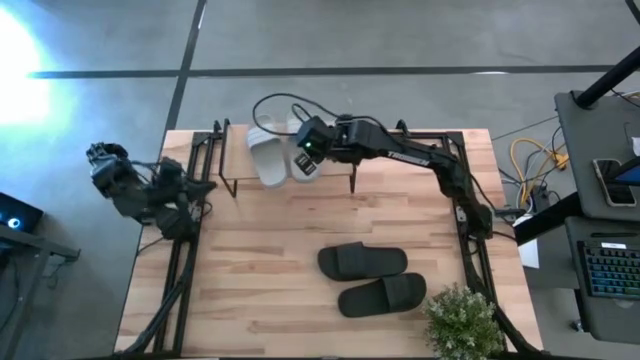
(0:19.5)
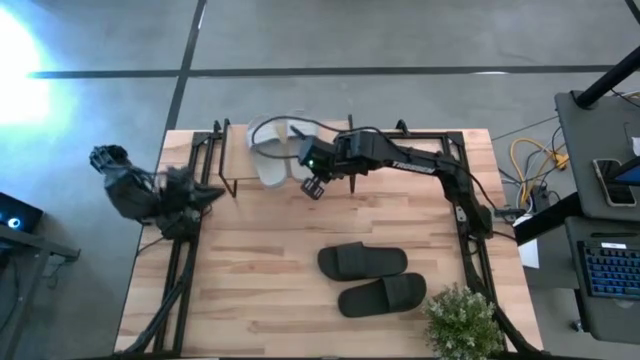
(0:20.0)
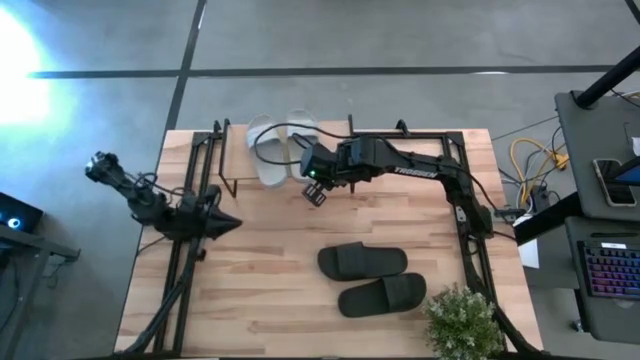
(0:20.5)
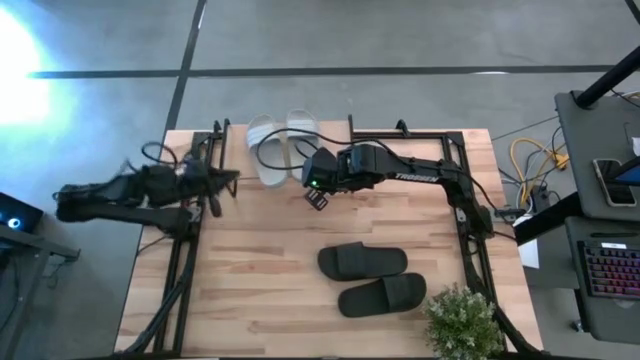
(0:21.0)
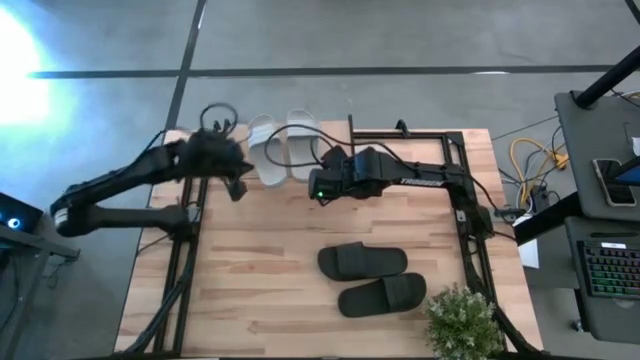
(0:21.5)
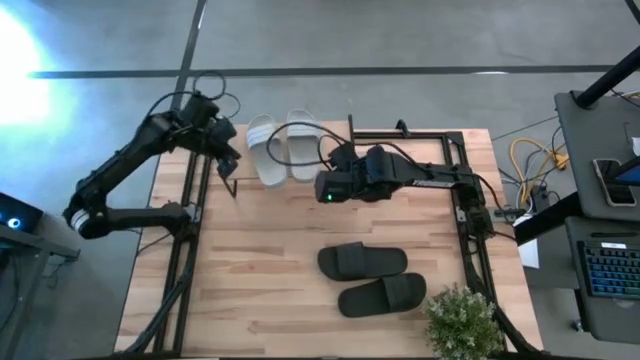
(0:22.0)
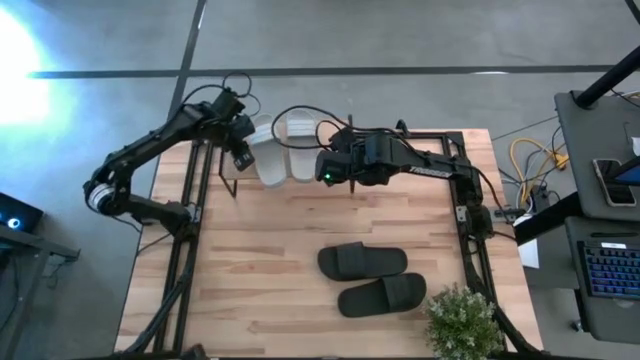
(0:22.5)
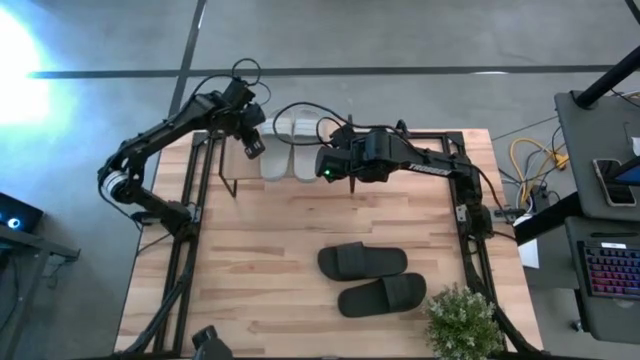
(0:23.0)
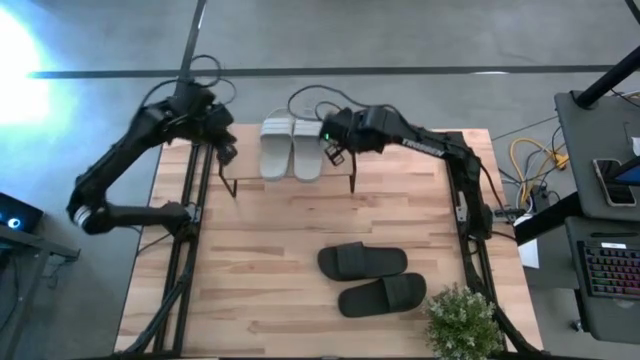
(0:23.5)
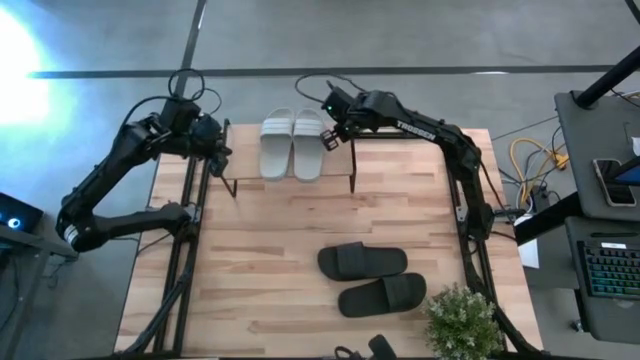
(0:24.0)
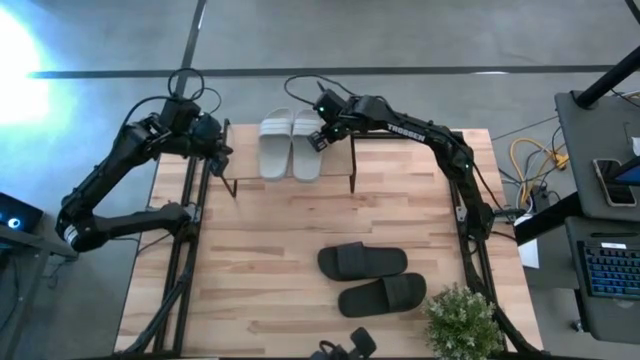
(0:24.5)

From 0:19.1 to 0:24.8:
Task: Pick and place slides into the shelf
Adjust the left and right gray slides on the shelf

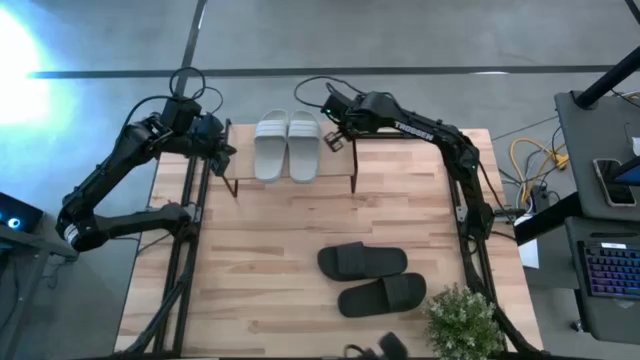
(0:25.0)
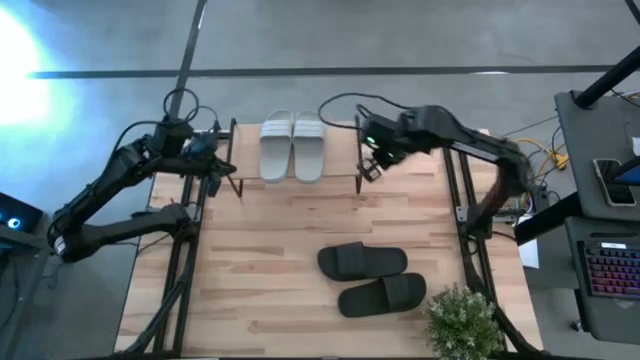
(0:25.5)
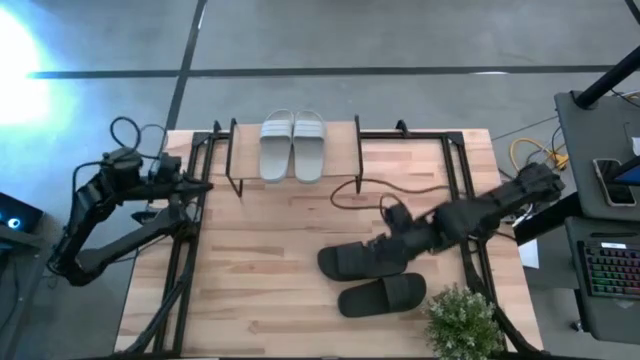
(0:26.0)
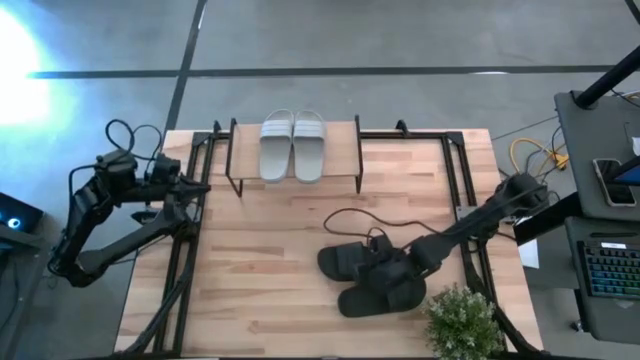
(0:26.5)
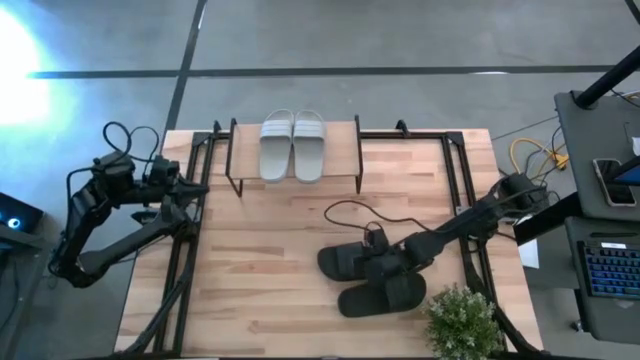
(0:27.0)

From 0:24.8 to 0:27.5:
Put the top black slides under the shelf

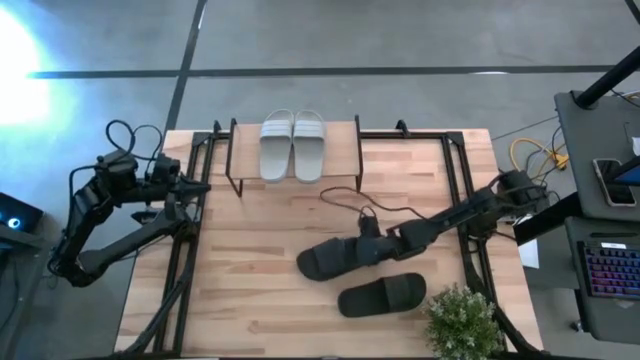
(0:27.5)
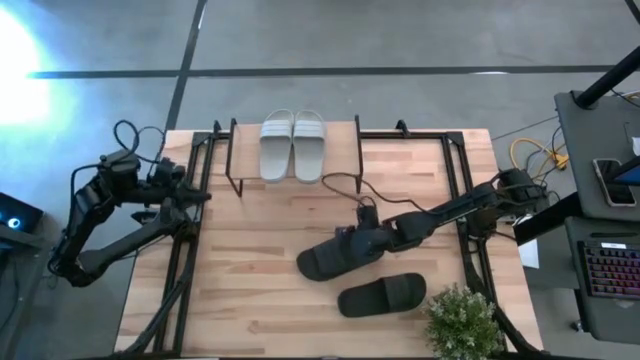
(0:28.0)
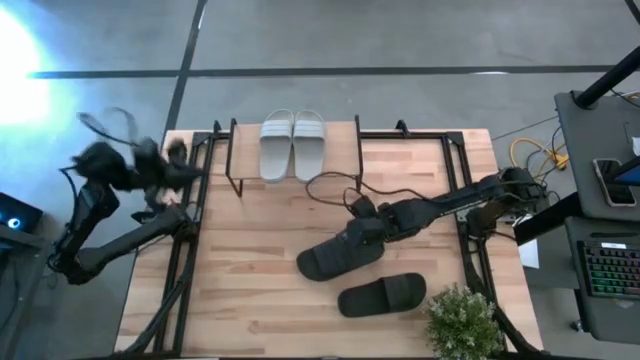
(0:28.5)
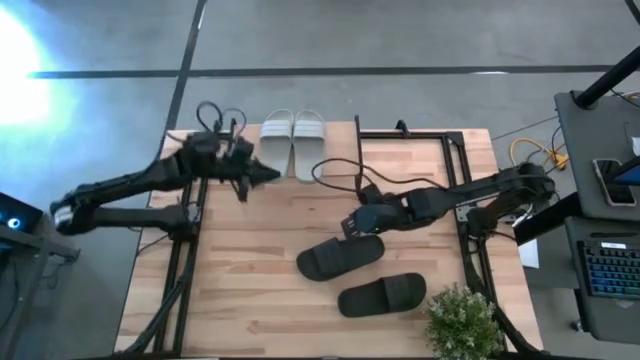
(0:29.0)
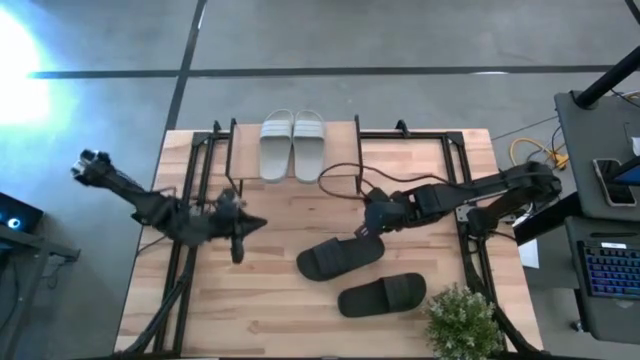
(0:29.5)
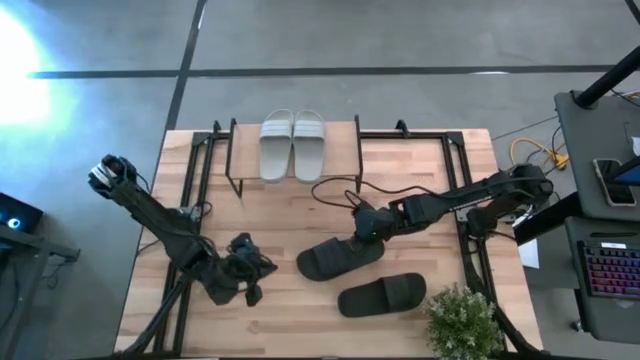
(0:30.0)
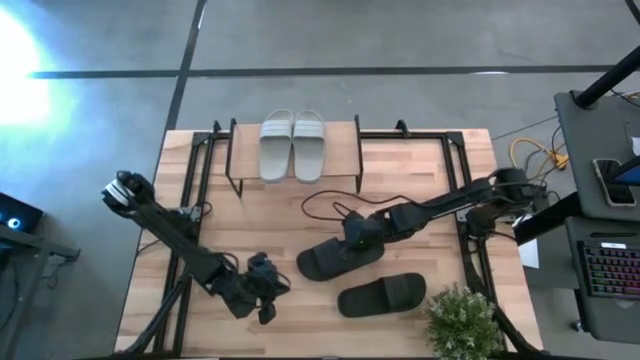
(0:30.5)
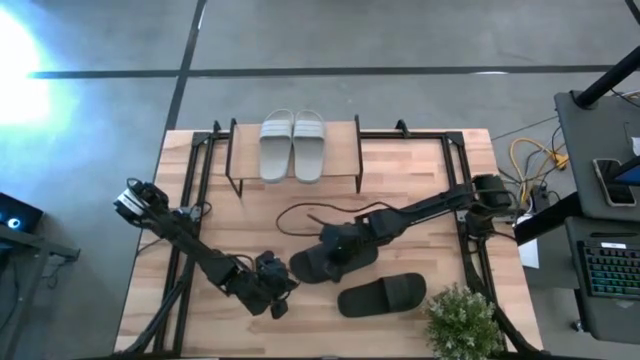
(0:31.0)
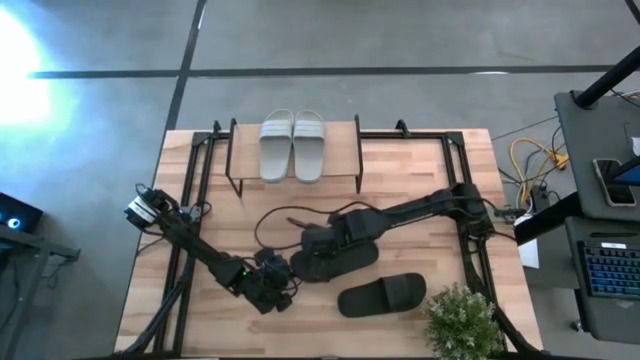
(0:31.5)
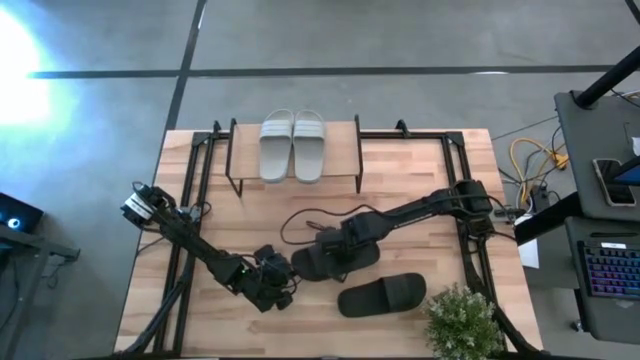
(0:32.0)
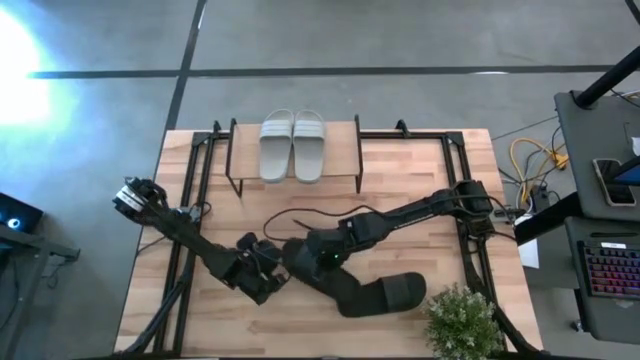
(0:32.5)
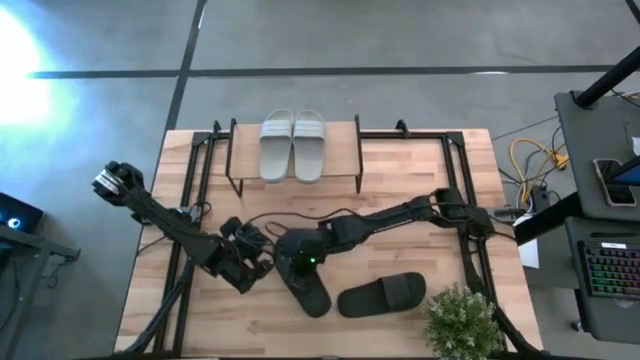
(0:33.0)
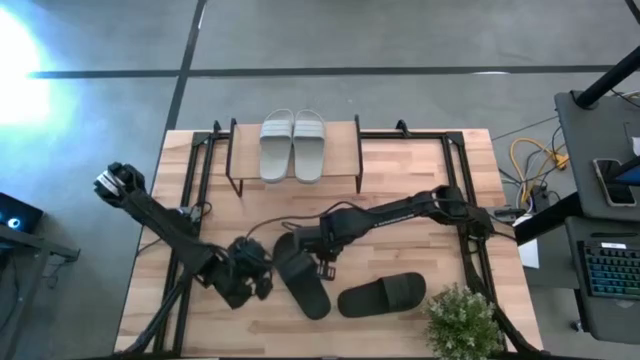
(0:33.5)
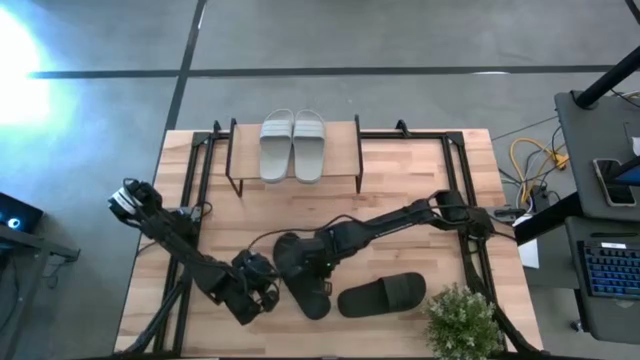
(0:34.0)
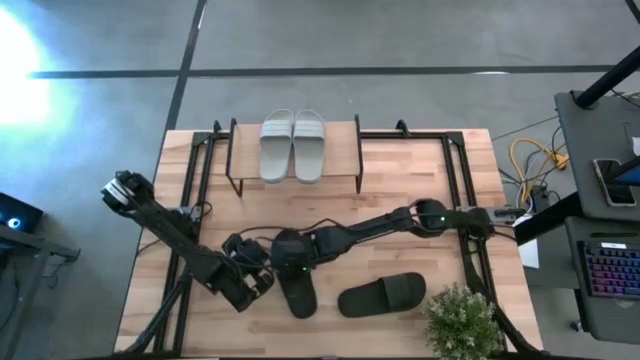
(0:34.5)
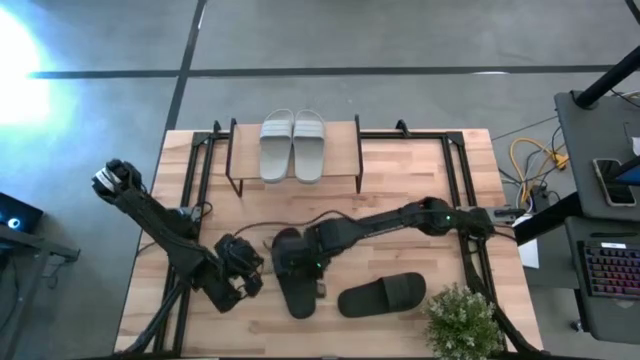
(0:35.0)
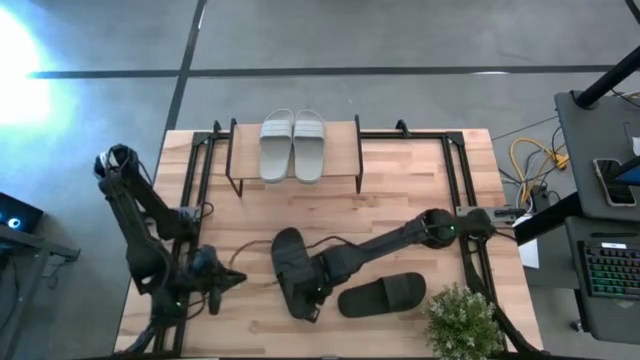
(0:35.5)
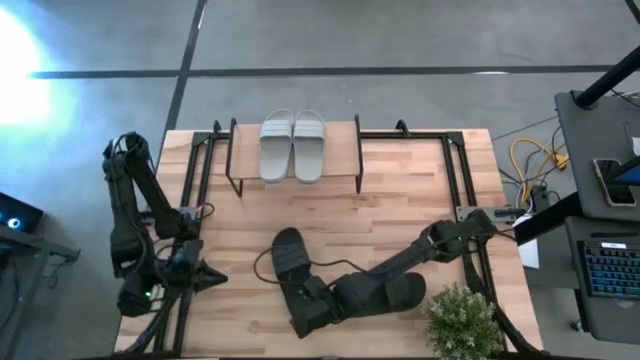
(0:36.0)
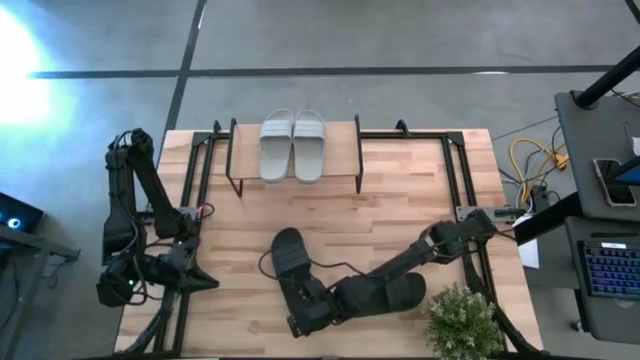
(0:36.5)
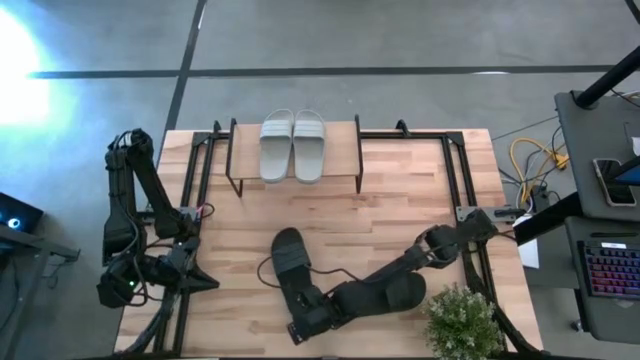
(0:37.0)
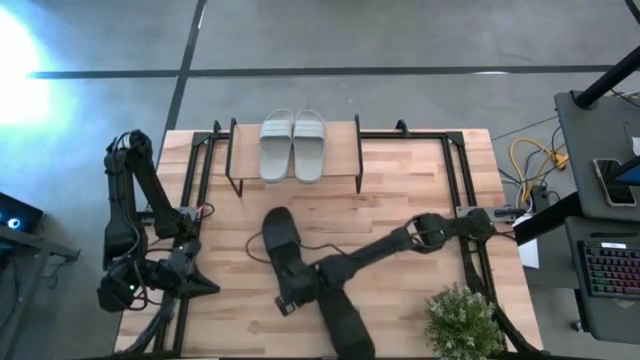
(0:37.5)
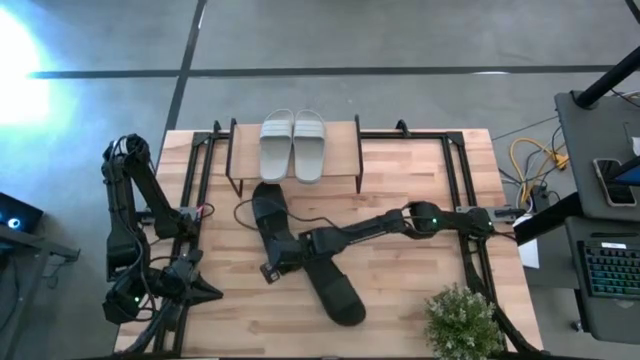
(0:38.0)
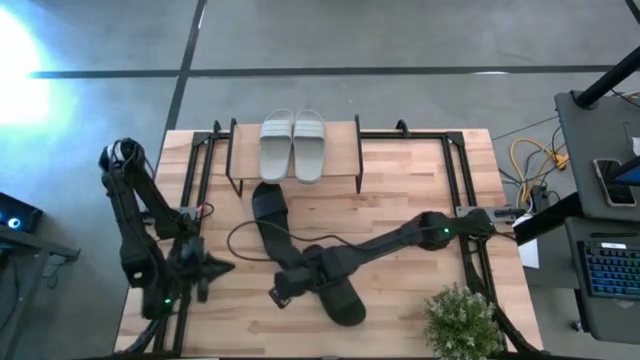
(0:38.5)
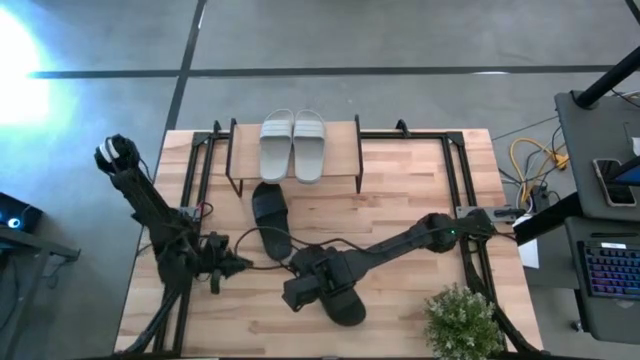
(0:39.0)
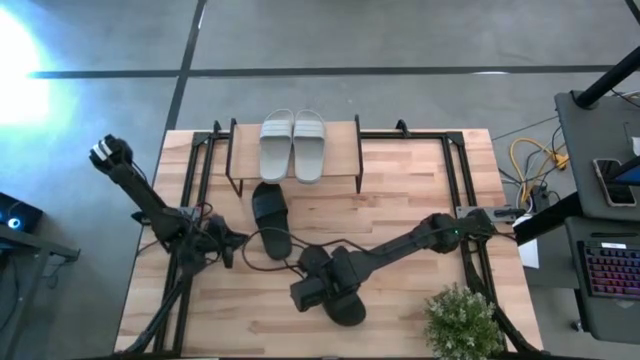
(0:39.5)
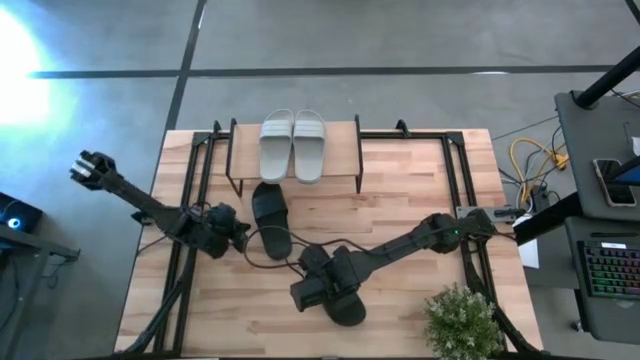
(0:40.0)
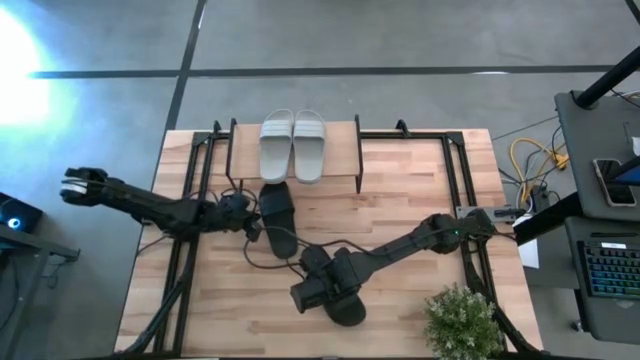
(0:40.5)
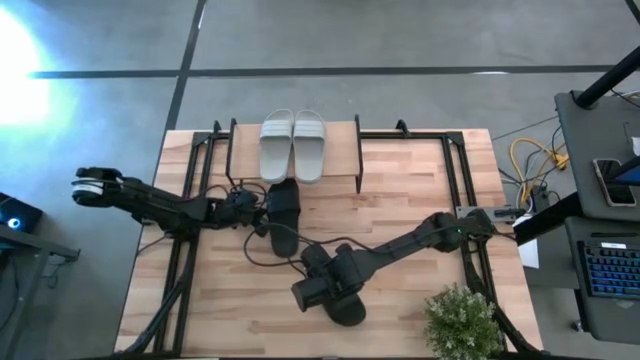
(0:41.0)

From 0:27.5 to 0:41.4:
Put the top slides under the shelf
